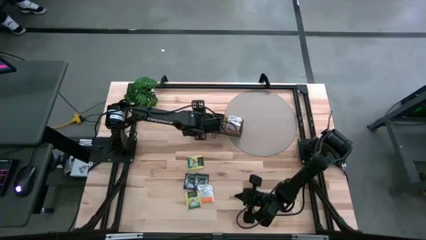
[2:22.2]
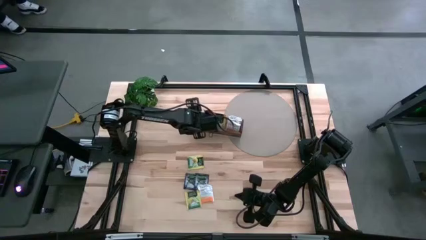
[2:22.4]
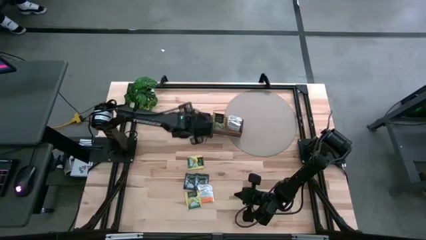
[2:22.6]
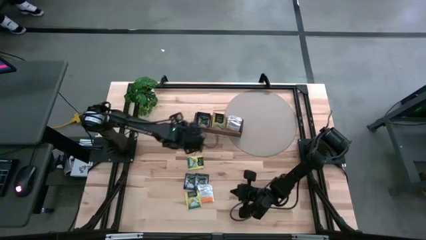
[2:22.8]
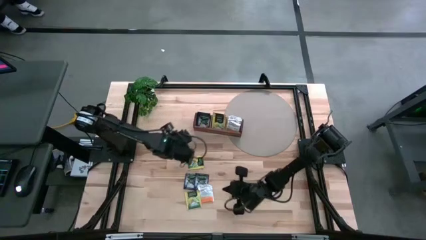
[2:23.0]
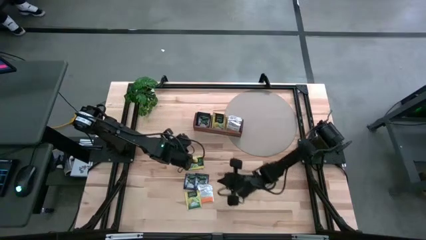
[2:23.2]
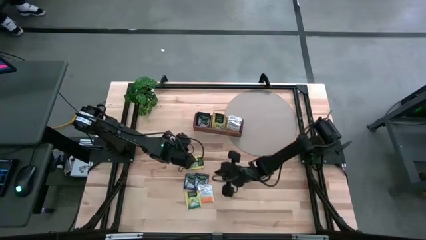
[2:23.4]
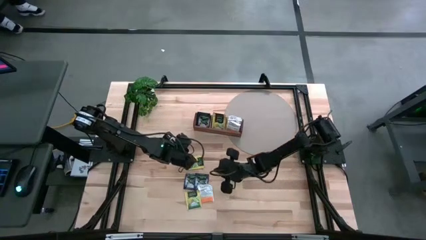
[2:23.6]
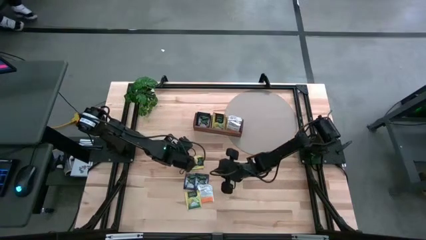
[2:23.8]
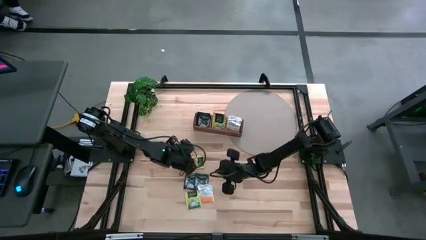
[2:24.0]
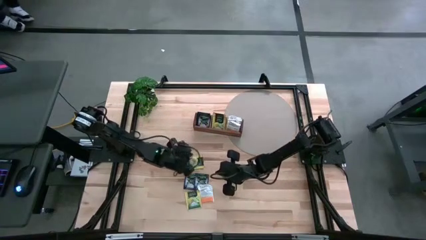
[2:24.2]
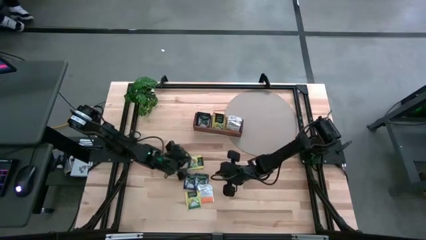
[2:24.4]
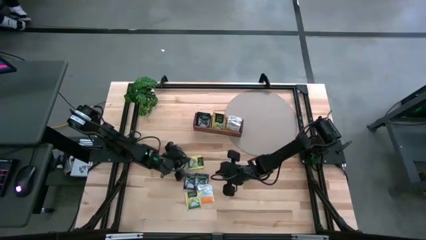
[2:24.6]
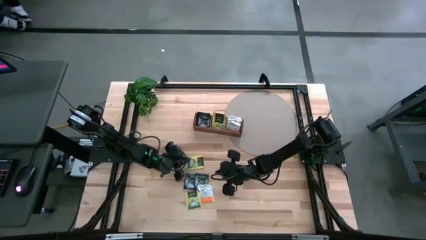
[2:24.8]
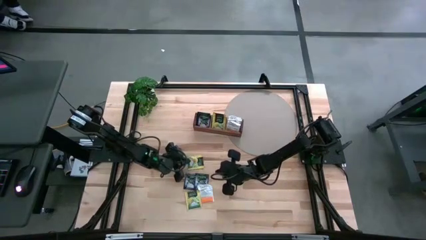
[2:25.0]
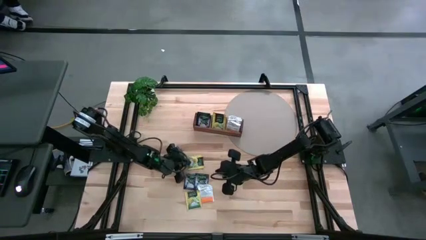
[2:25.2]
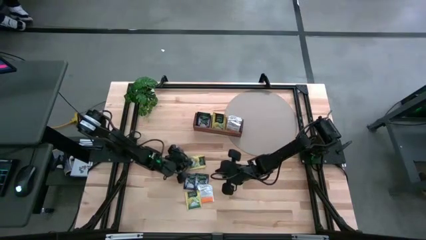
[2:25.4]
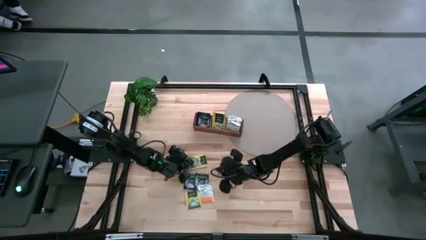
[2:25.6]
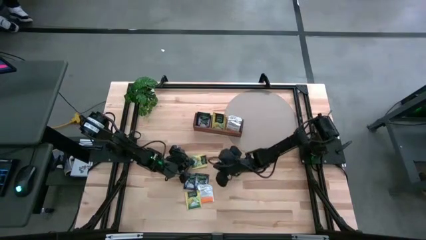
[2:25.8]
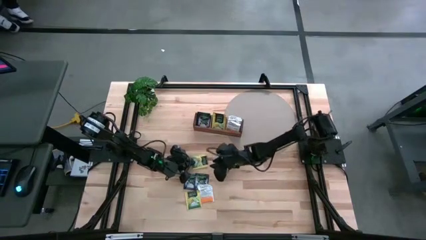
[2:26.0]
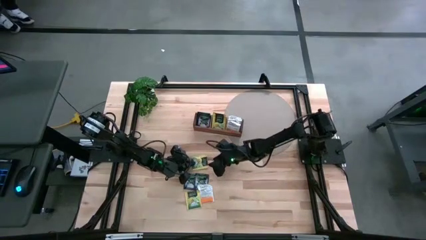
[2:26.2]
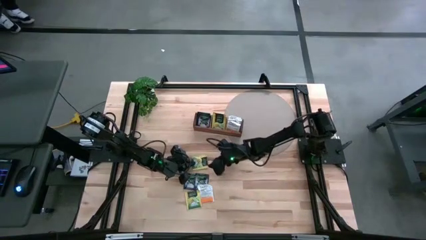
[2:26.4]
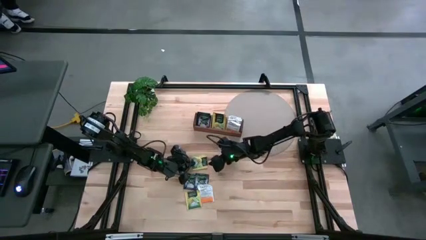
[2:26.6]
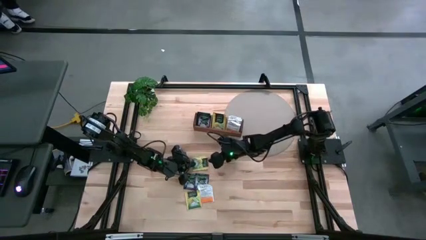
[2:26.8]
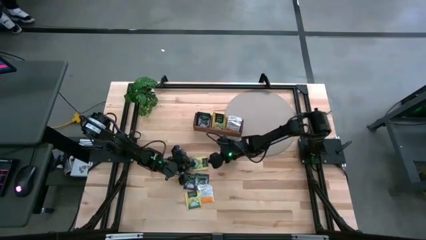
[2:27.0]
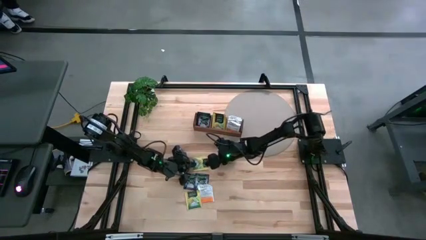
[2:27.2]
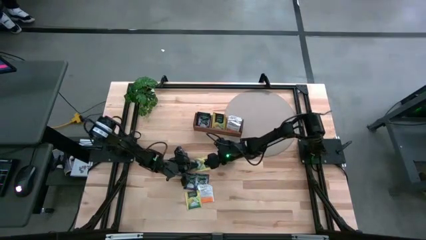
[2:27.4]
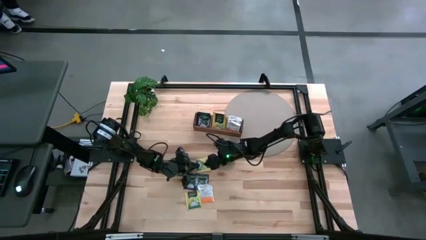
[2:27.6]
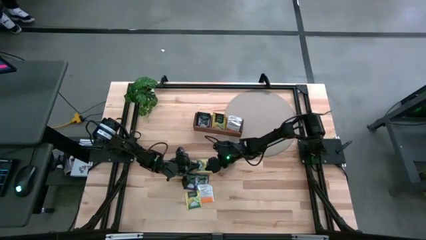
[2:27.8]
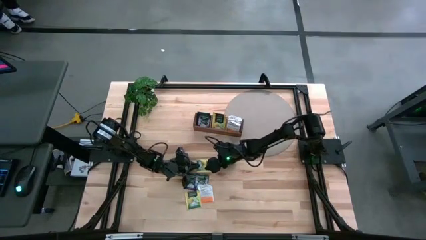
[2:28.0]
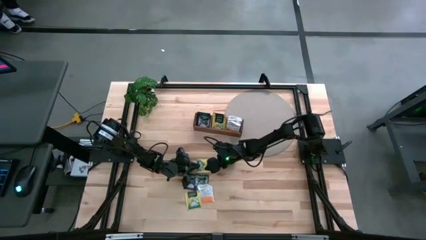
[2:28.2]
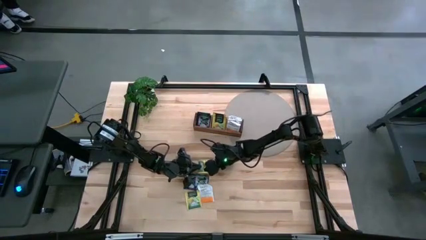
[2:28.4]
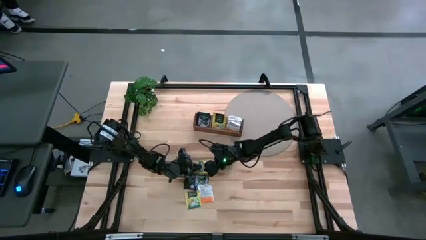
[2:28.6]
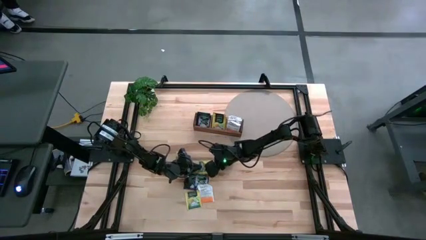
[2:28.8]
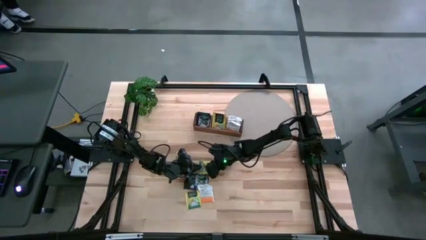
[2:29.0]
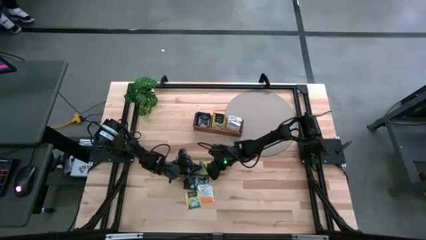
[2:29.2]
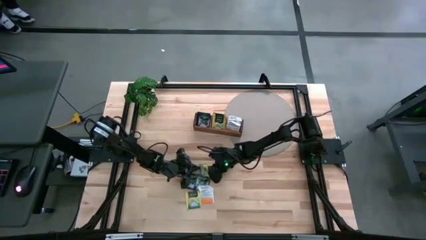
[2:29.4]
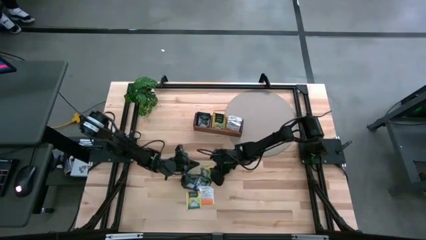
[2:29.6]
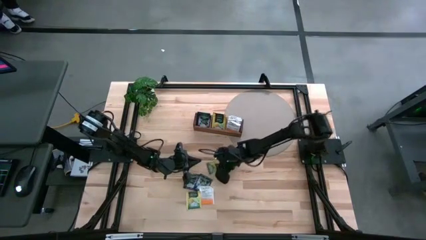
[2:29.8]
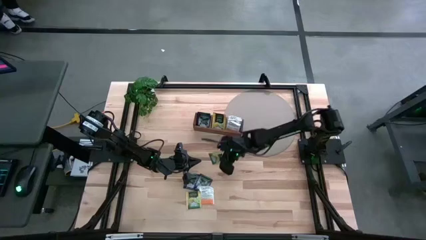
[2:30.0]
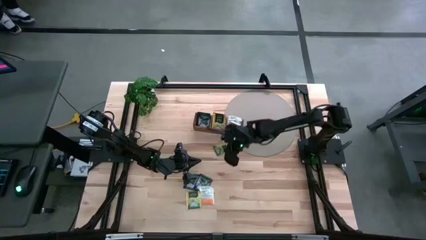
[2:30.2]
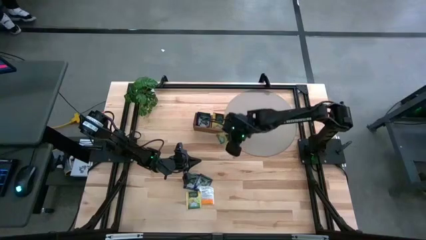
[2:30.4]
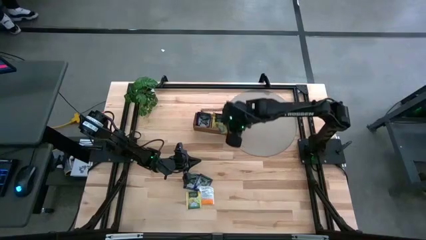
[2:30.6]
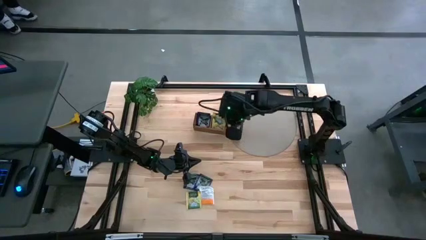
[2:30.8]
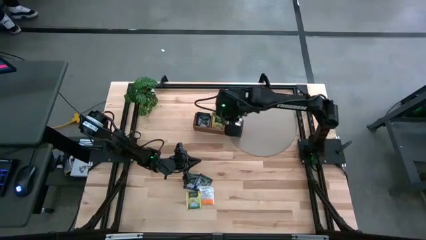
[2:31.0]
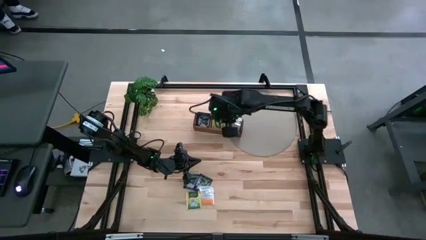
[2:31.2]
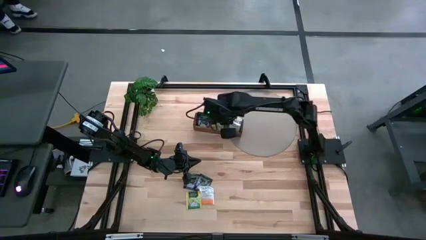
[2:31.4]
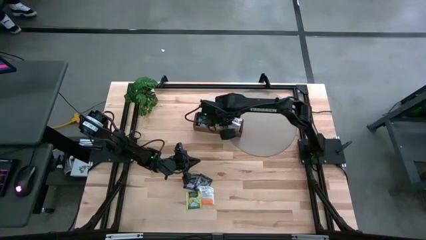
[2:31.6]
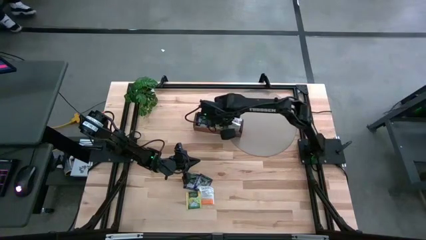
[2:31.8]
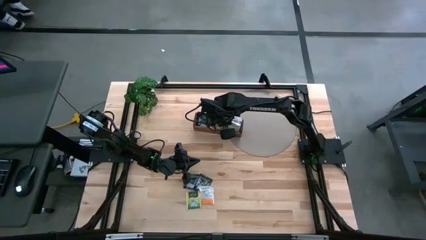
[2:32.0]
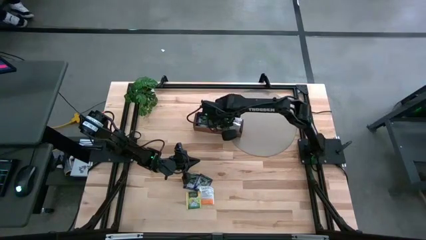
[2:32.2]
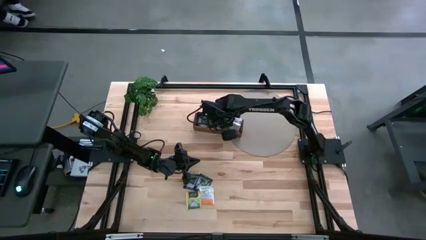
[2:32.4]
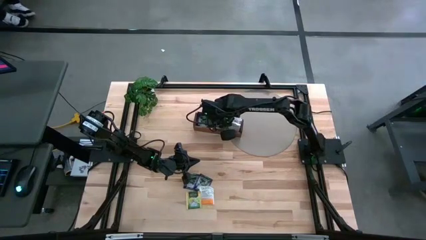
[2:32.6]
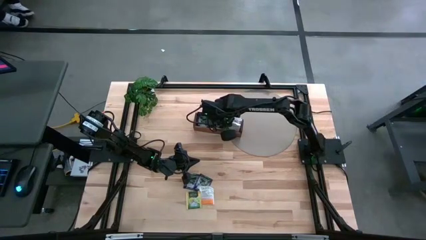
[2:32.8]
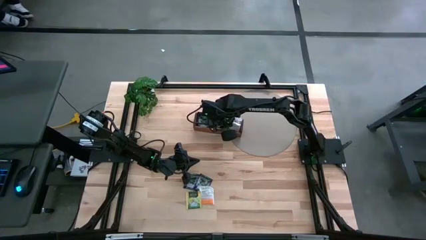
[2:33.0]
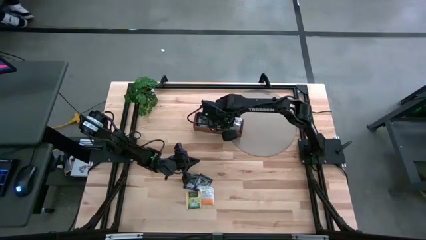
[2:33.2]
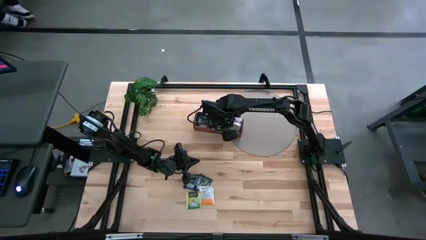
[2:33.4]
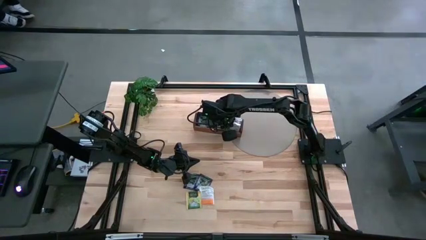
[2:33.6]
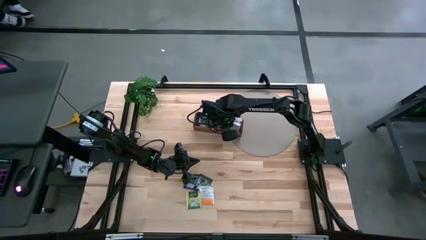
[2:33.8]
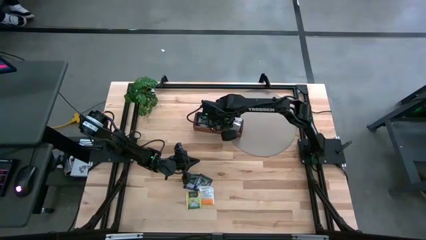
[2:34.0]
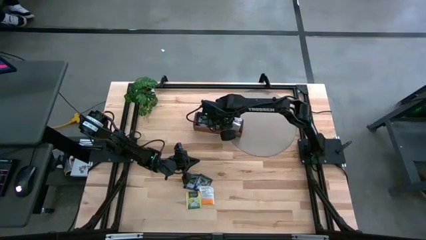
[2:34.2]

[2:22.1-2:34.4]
Task: Pick & Place Tea
Put the yellow tea bag into the middle section of the wooden organizer
